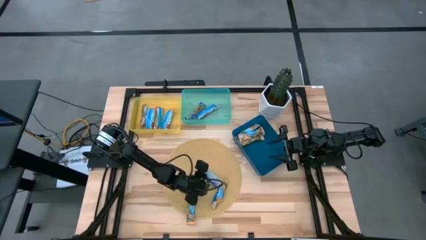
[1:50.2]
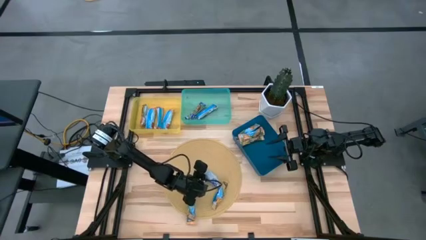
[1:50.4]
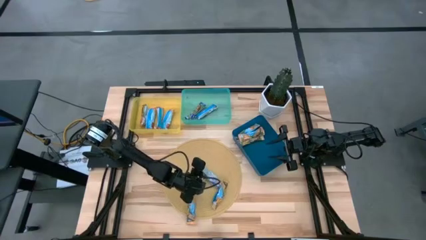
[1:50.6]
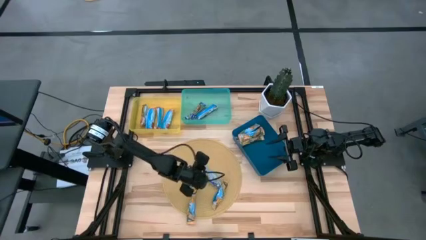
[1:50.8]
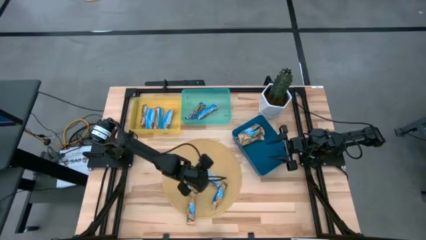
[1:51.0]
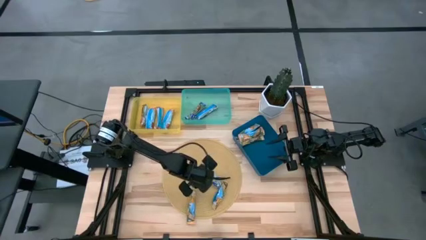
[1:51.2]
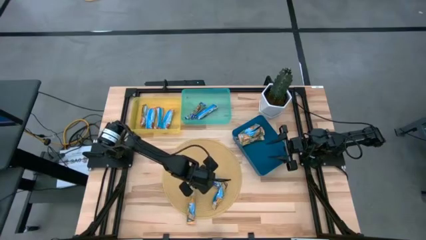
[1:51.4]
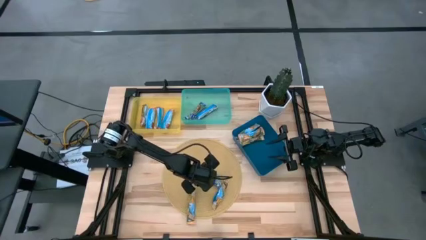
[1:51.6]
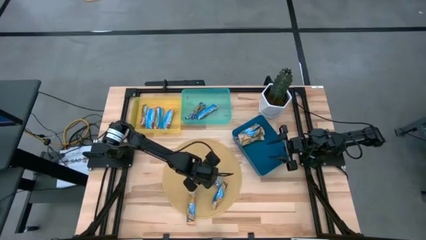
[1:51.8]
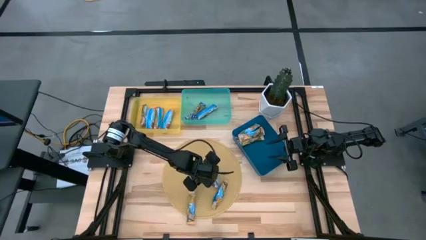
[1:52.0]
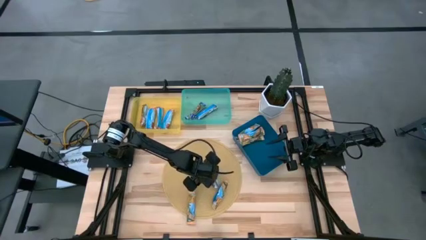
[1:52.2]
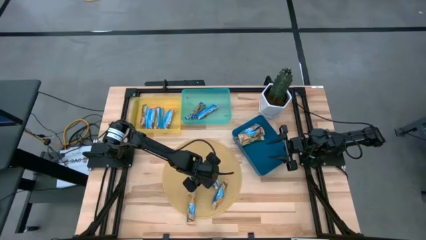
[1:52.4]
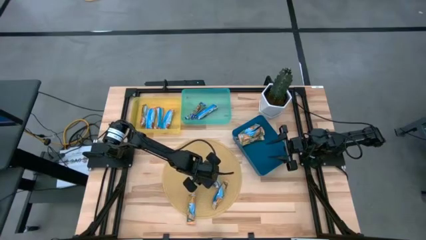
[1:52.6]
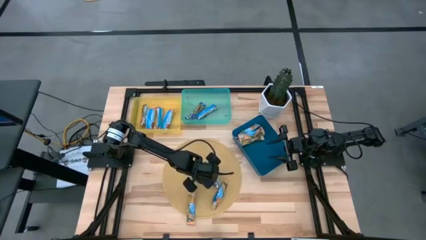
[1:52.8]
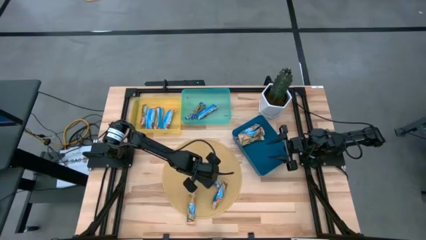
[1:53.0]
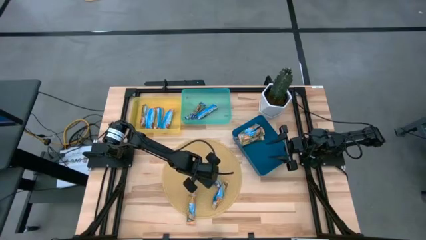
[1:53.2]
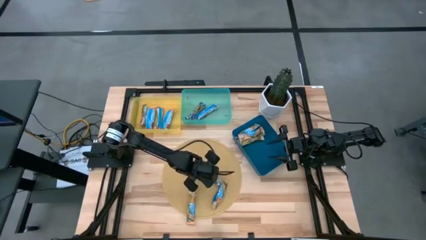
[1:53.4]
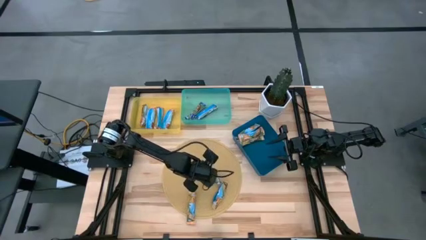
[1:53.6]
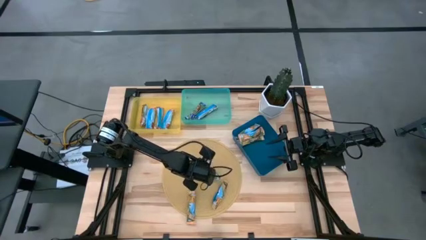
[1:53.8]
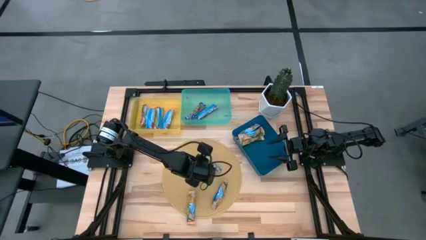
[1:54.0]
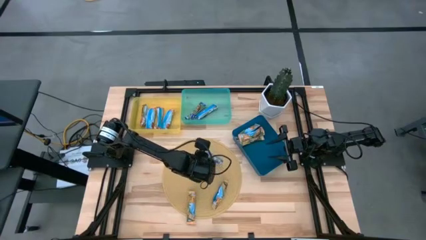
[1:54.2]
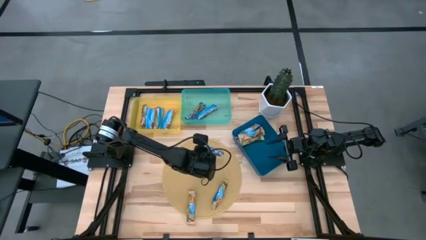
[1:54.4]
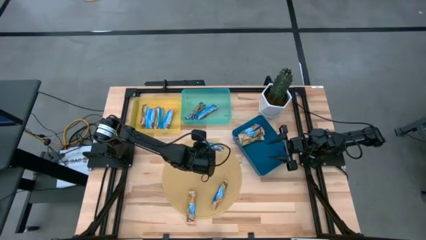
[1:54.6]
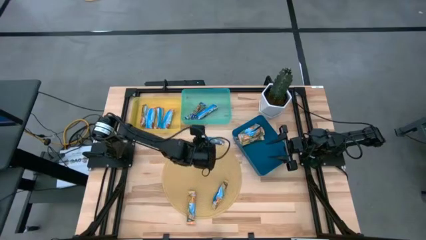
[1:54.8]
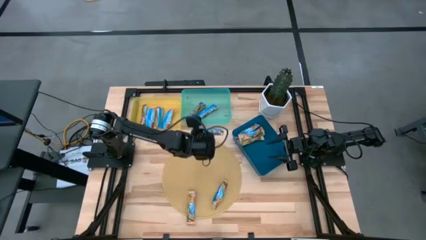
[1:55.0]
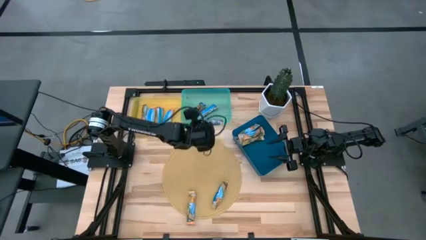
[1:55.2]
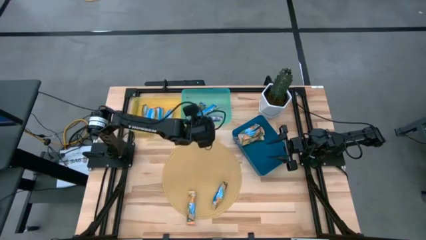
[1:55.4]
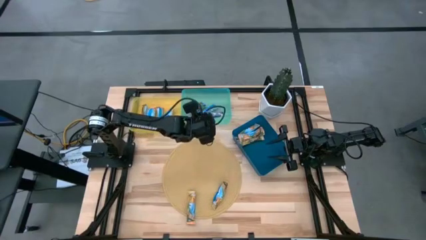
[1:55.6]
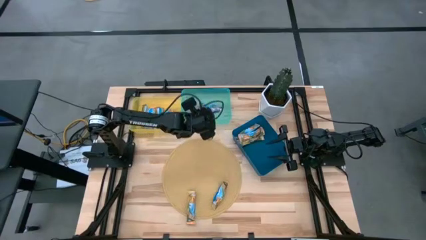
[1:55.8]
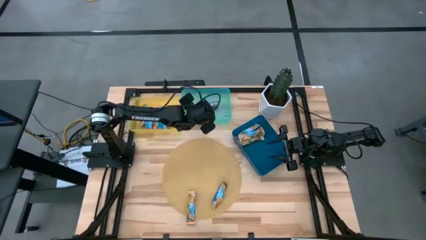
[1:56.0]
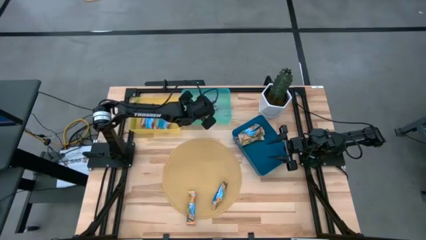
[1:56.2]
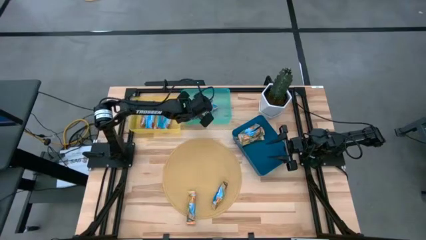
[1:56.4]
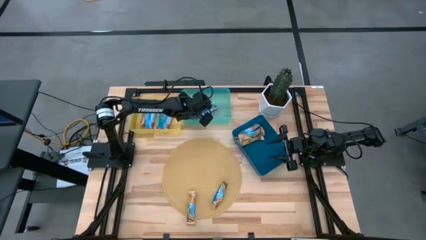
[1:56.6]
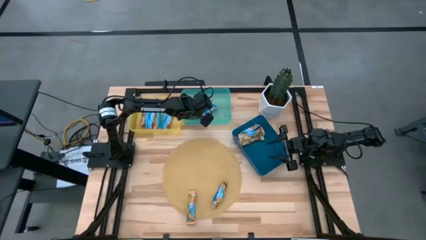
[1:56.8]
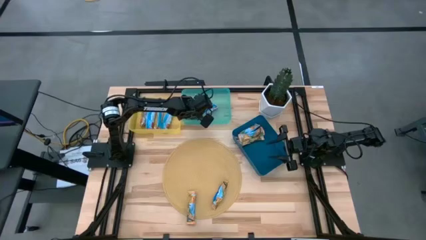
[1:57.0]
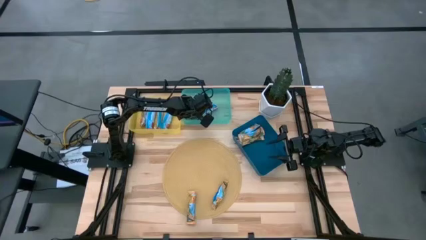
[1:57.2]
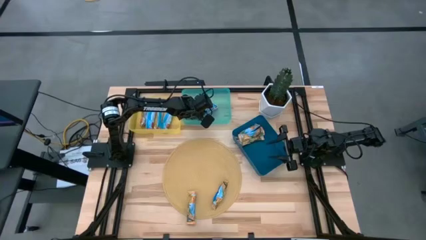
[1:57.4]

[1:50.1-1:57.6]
Task: Pick and place Granola Bars by type
Put the blue granola bar into the light blue bin

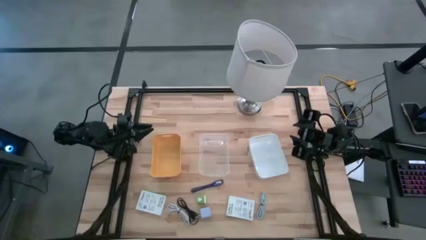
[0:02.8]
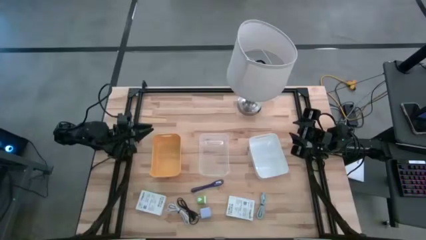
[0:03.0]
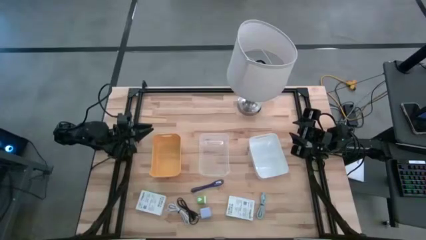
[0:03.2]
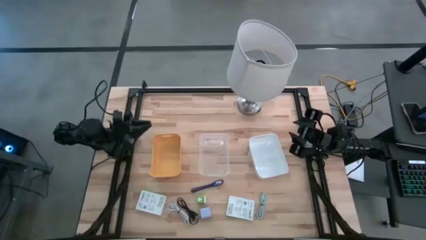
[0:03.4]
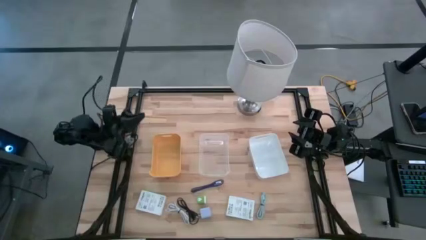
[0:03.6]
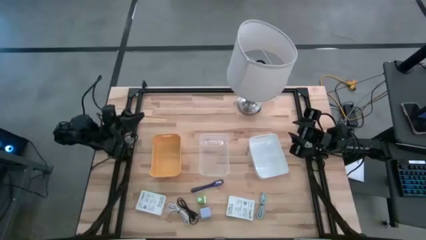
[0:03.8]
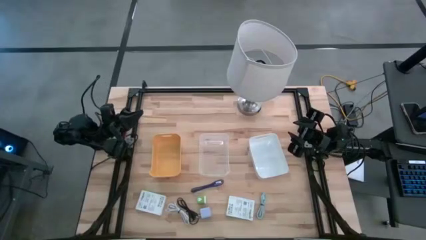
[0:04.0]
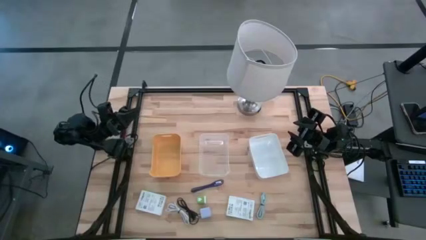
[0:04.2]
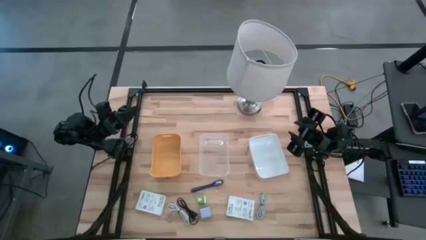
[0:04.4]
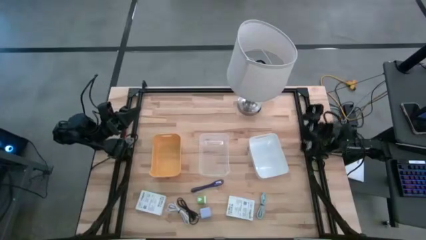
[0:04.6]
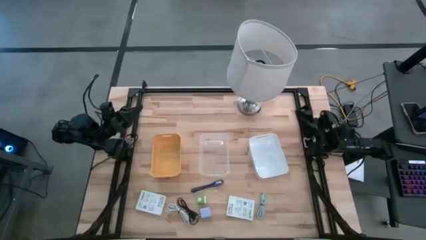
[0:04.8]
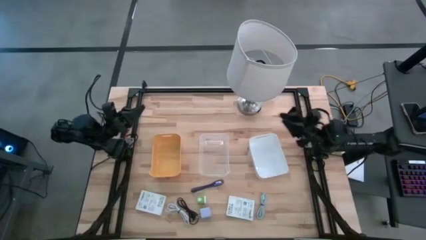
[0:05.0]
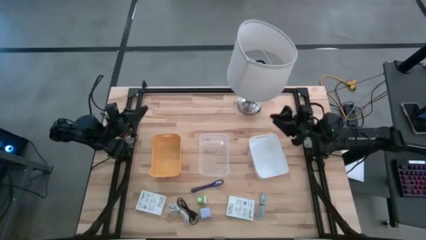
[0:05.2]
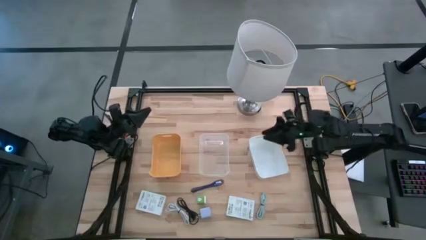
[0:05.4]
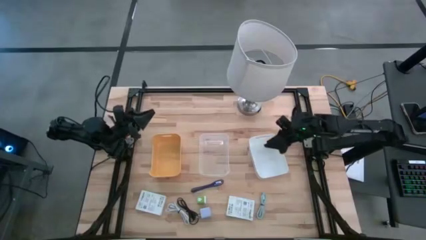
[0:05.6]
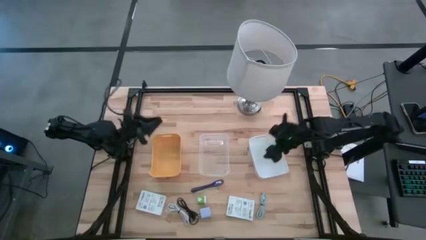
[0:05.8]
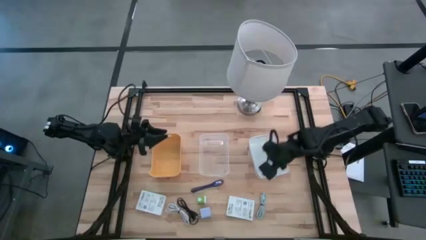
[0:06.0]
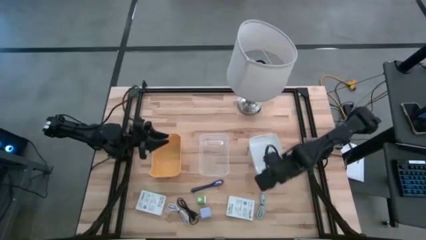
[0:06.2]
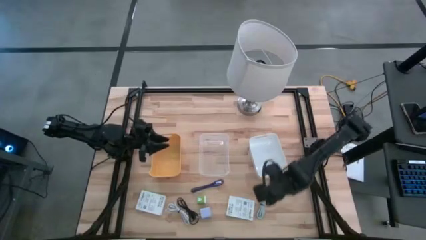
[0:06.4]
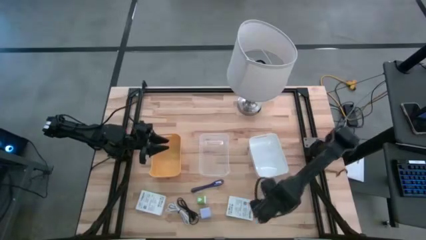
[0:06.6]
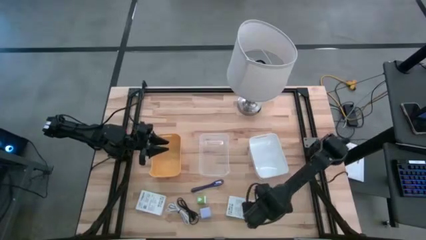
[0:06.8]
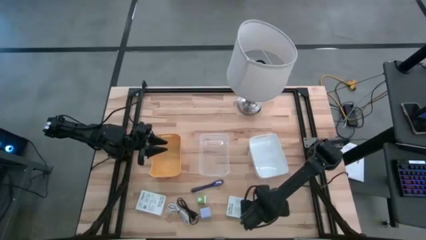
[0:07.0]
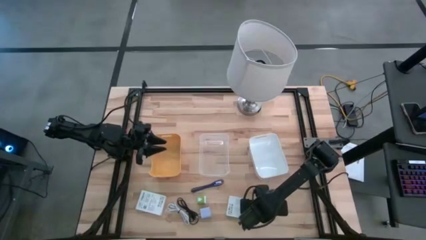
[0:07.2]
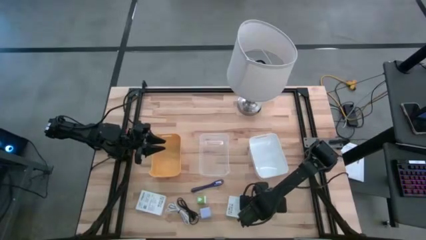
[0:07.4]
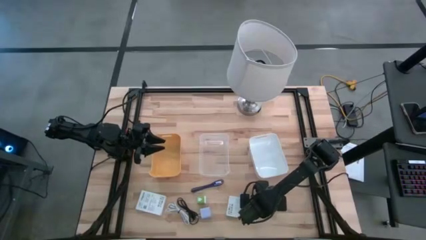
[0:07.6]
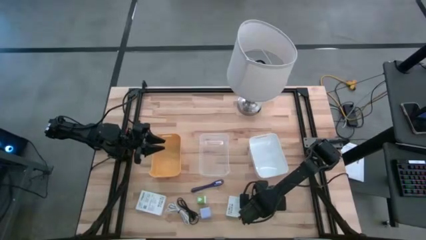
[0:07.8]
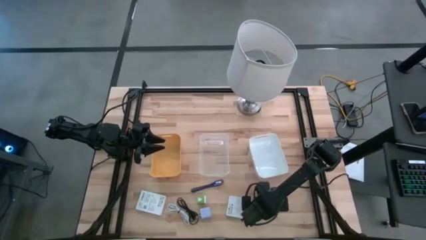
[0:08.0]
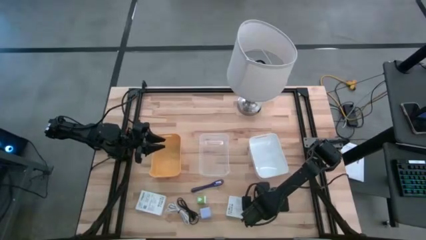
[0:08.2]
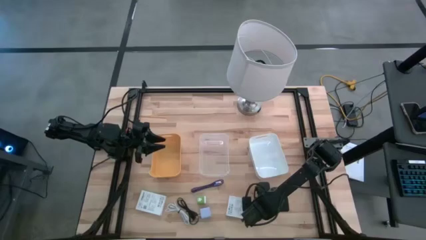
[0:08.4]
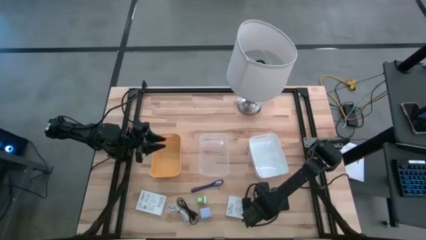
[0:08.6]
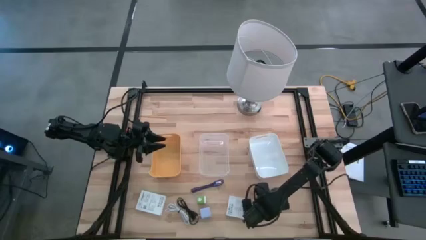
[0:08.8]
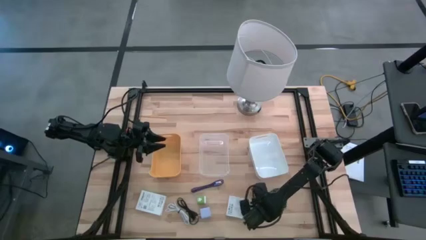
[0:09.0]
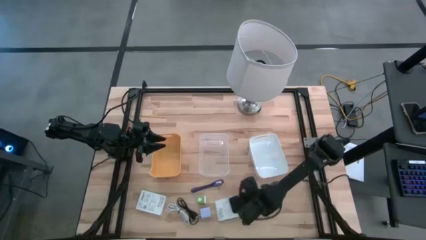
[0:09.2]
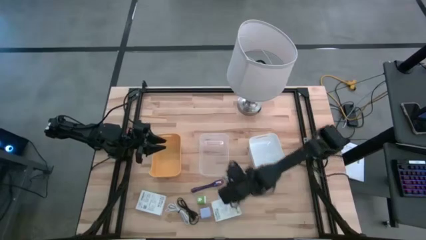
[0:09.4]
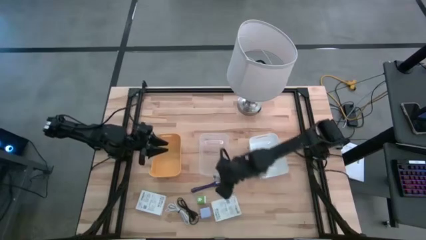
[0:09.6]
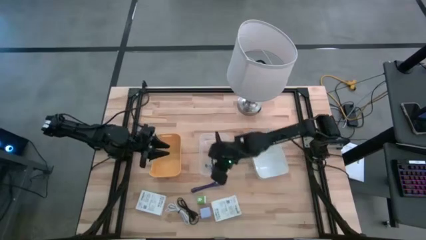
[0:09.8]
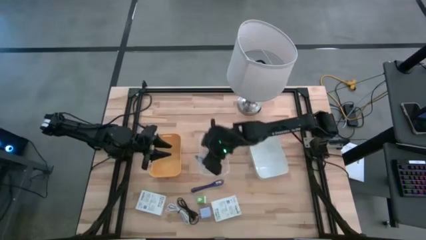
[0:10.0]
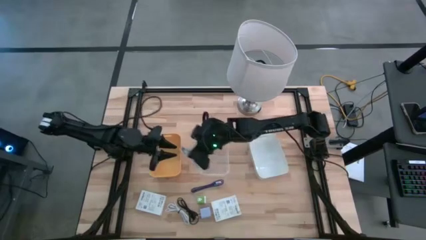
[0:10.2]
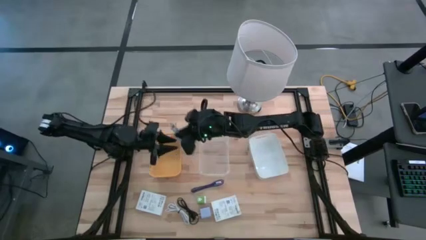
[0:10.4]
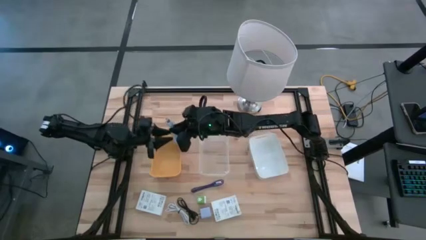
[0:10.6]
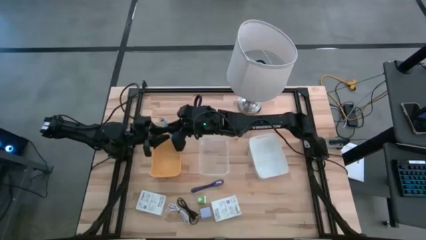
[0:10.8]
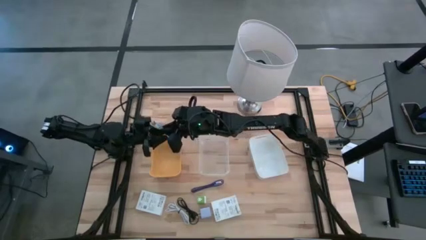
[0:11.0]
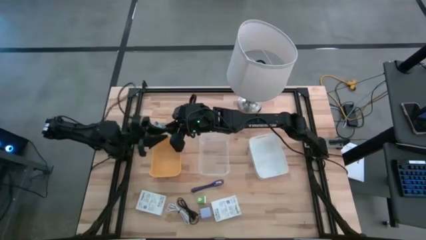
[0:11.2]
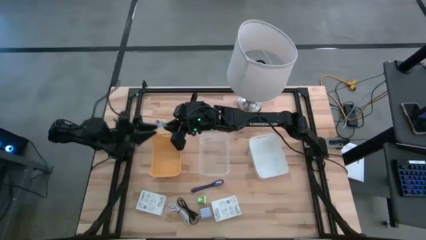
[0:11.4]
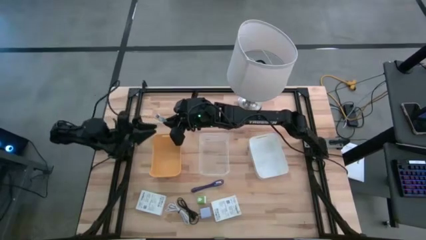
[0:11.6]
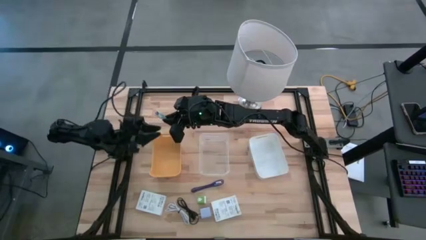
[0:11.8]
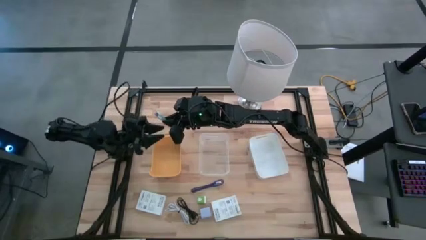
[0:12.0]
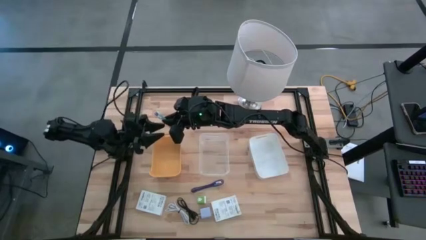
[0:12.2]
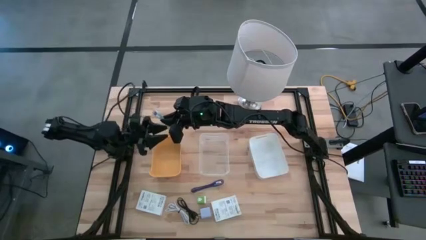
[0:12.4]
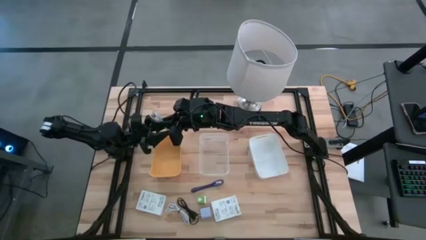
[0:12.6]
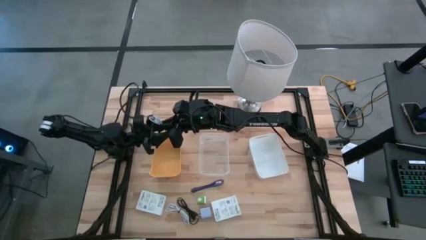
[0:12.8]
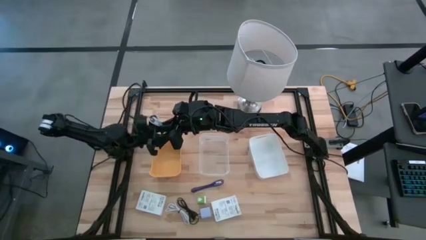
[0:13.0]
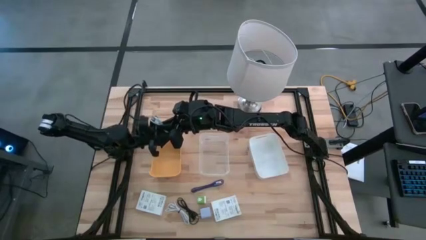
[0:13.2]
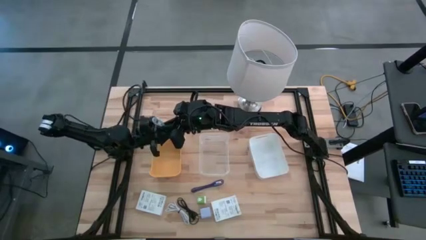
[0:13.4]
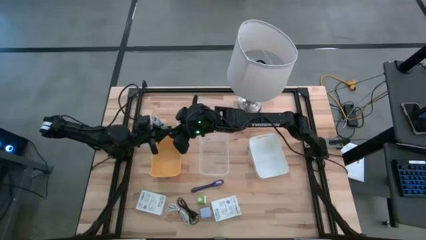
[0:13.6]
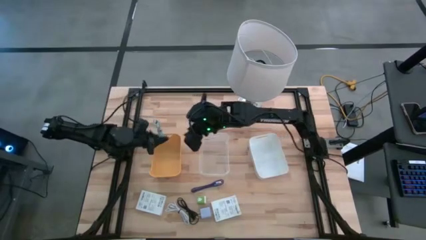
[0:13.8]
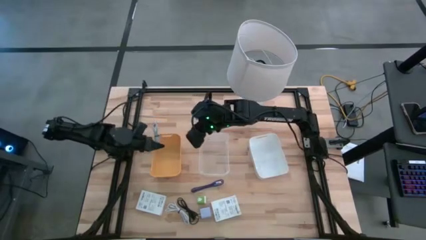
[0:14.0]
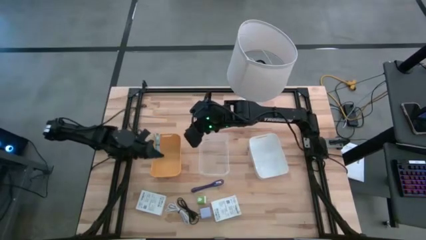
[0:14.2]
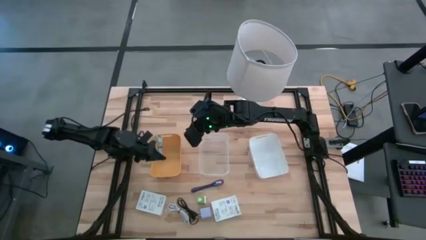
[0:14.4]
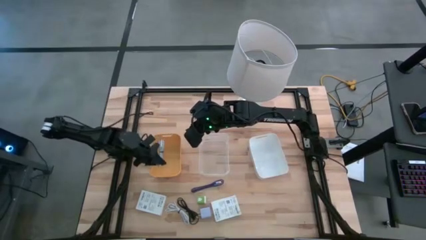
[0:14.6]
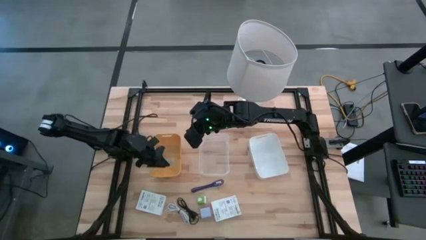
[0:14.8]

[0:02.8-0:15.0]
Task: Pick and place items into bin
Put the gray charger cable into the yellow bin
